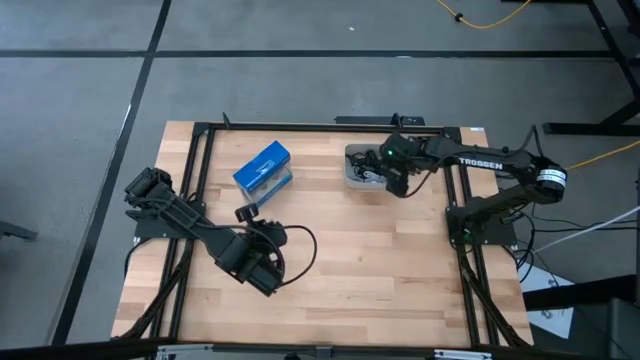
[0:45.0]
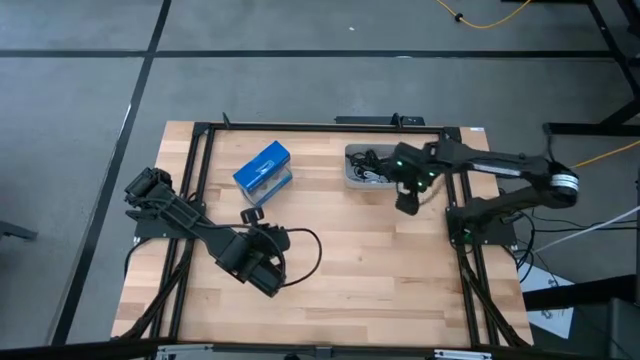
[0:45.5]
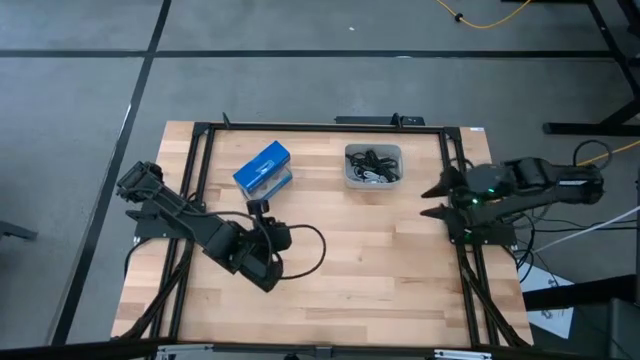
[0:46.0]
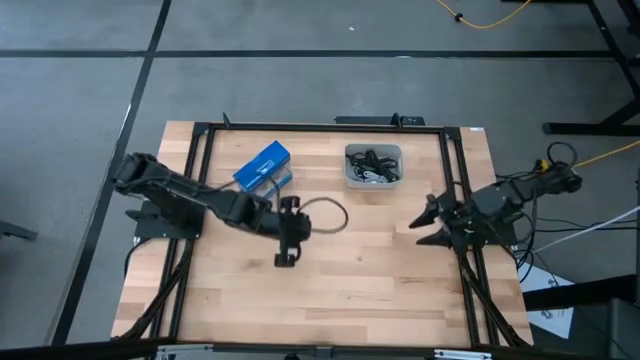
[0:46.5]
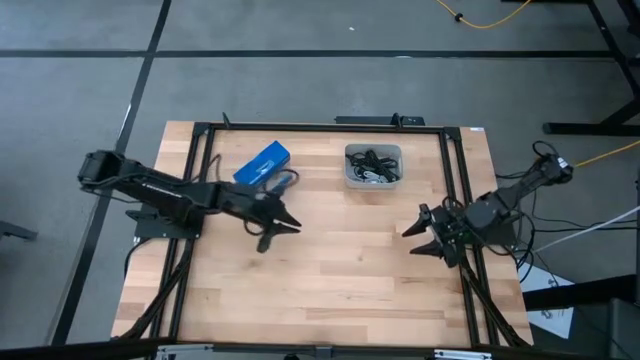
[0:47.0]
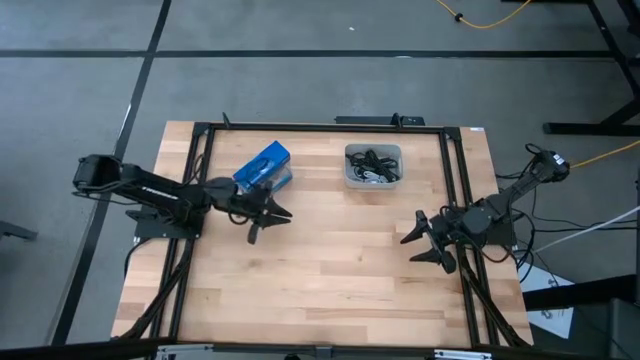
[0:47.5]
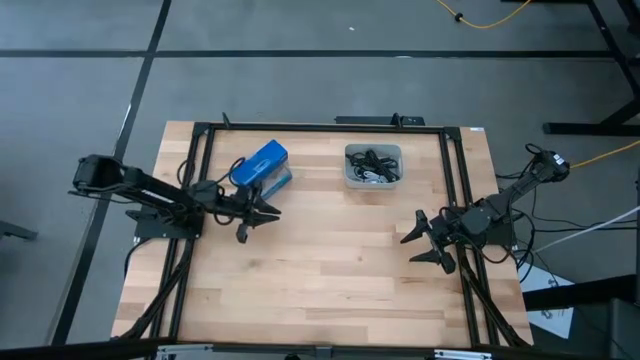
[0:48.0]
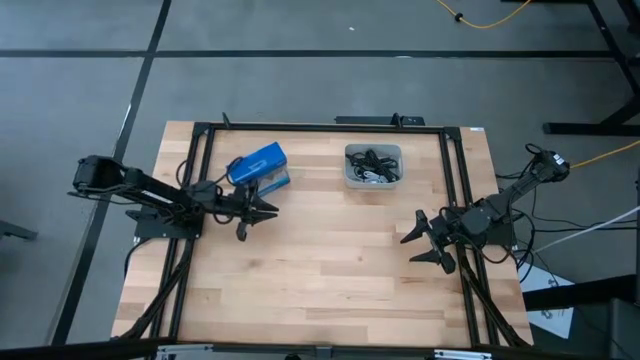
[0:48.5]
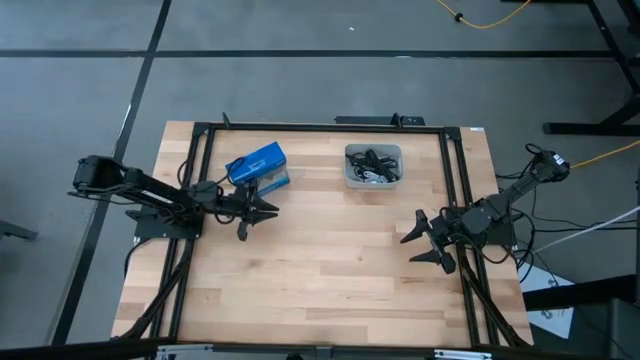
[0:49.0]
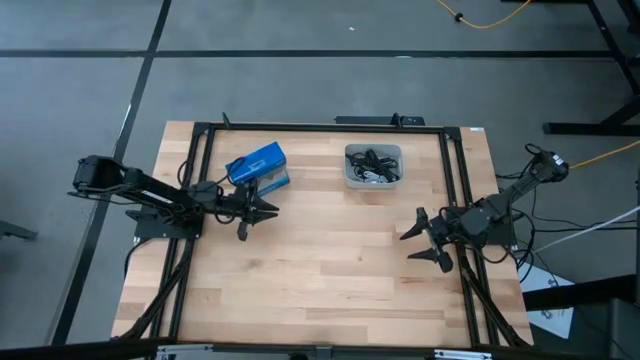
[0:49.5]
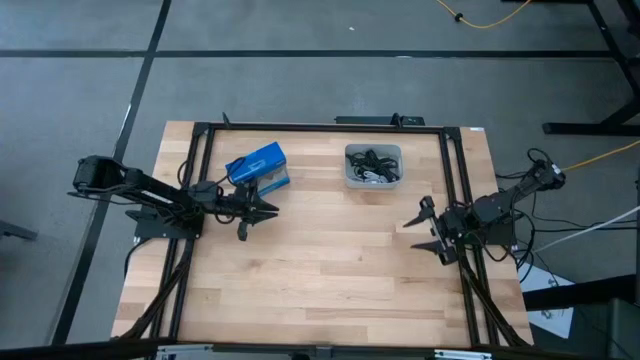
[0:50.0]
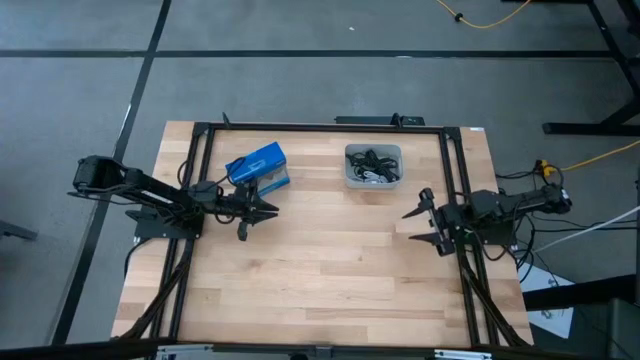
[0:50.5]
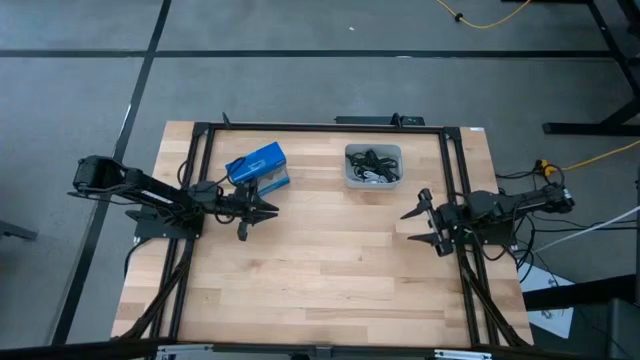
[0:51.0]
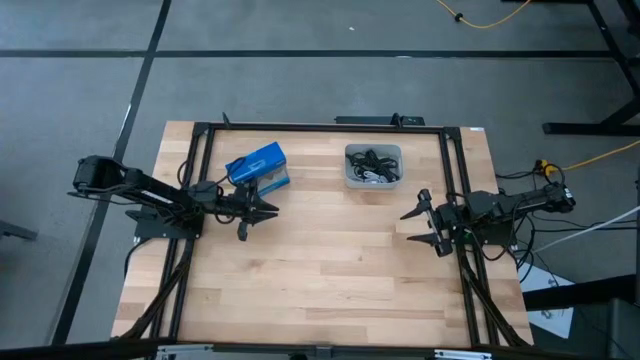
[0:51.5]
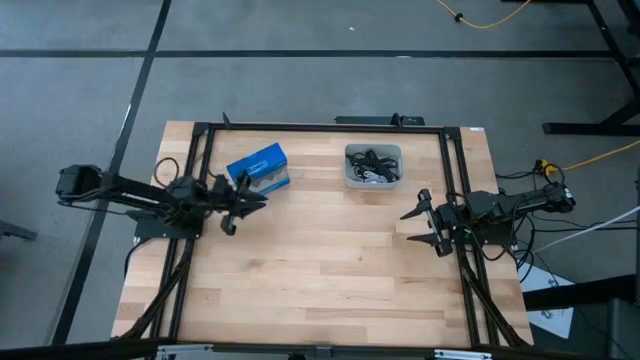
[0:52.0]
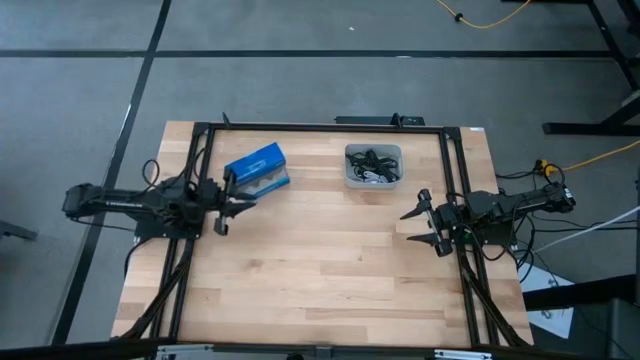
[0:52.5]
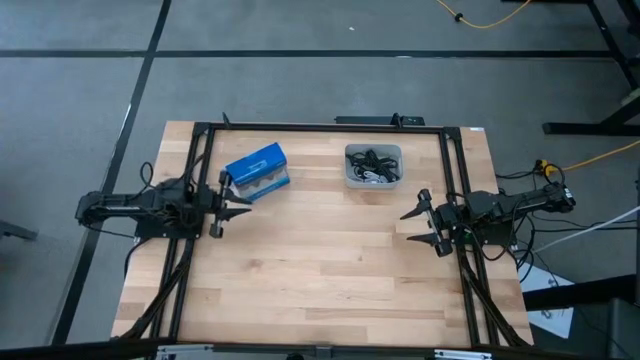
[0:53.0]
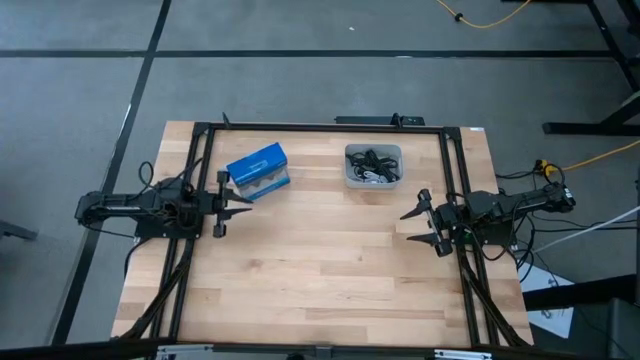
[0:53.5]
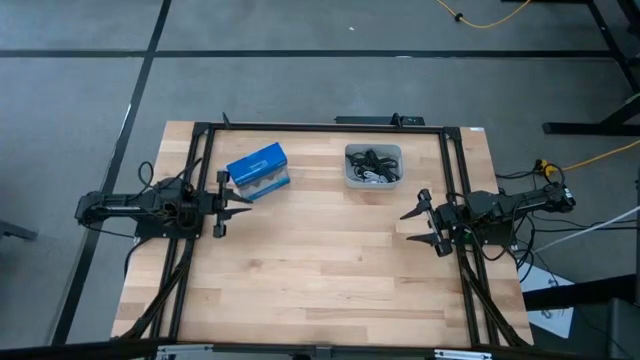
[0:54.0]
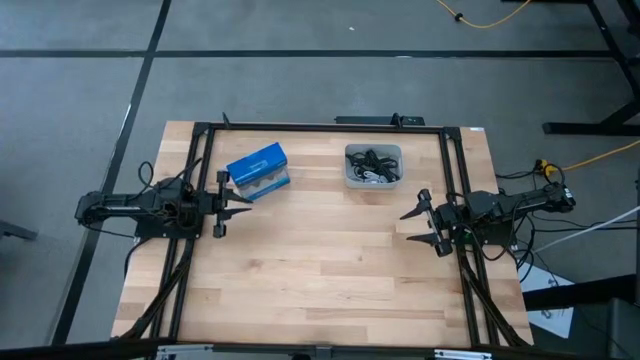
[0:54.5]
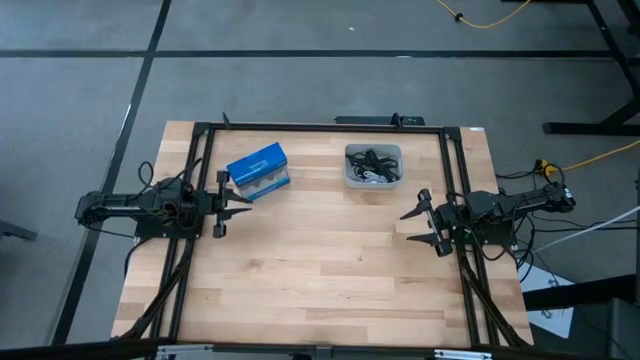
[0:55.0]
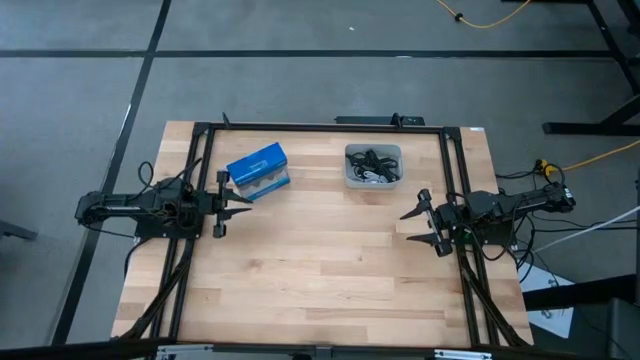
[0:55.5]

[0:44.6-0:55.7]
Task: Pick and place USB-C Cables
Return to Home Position

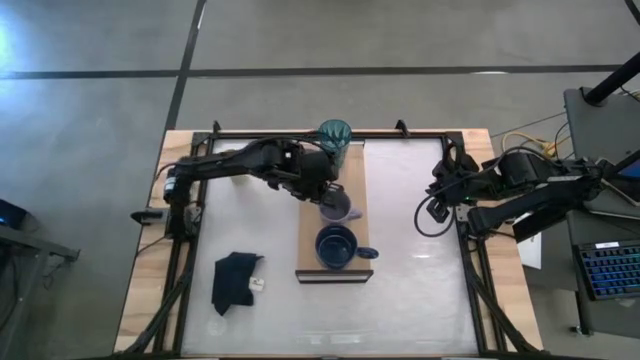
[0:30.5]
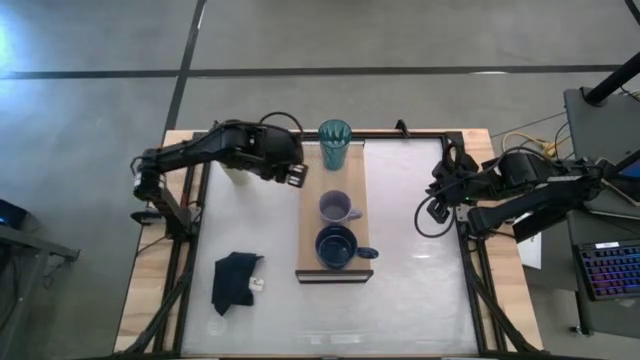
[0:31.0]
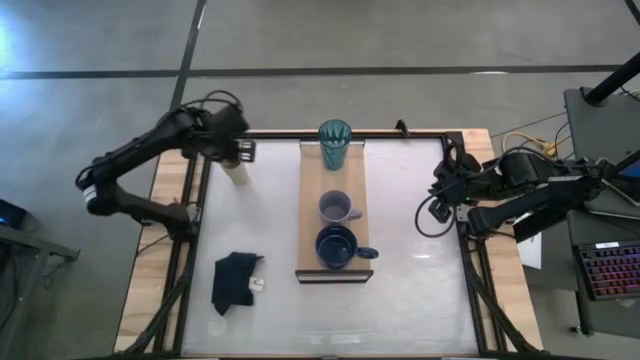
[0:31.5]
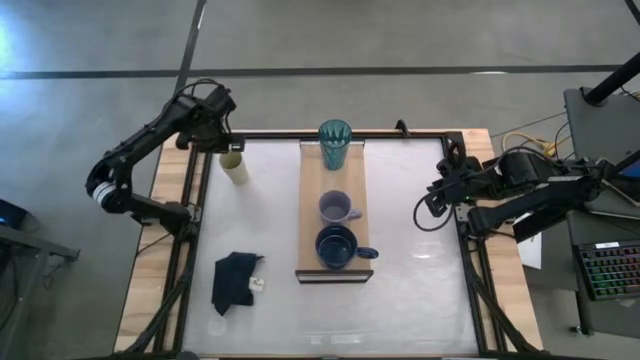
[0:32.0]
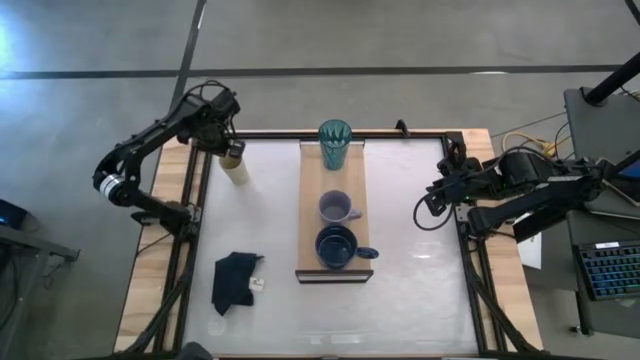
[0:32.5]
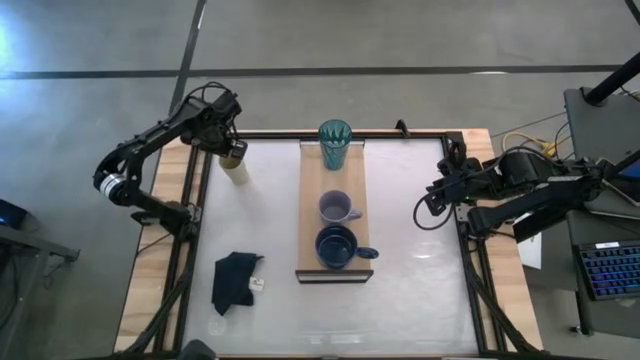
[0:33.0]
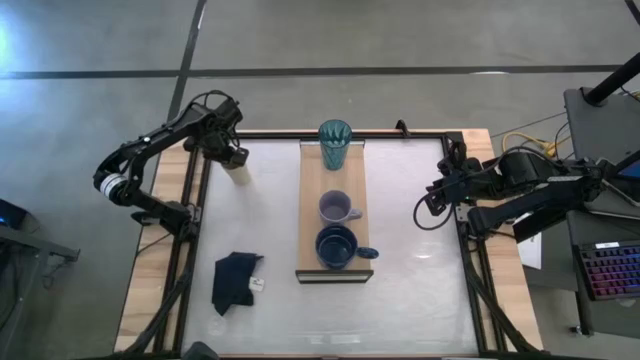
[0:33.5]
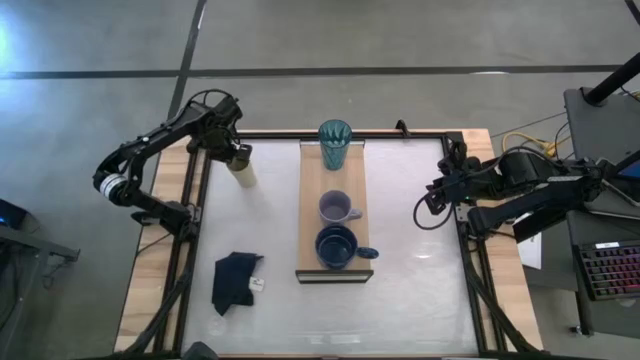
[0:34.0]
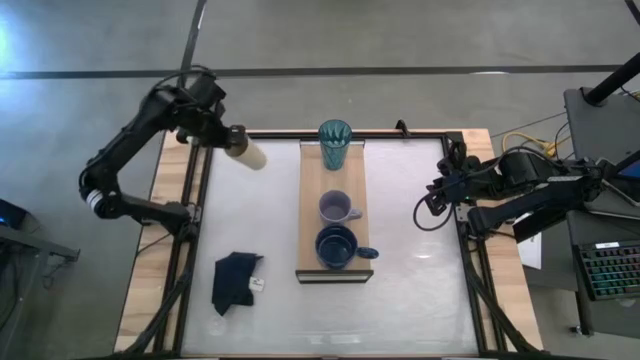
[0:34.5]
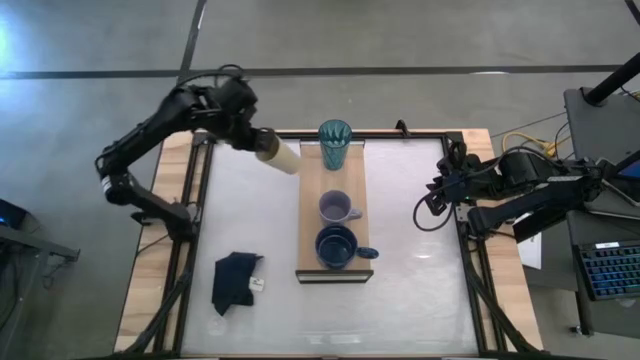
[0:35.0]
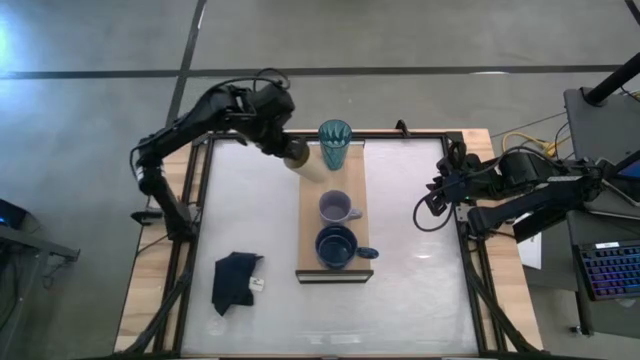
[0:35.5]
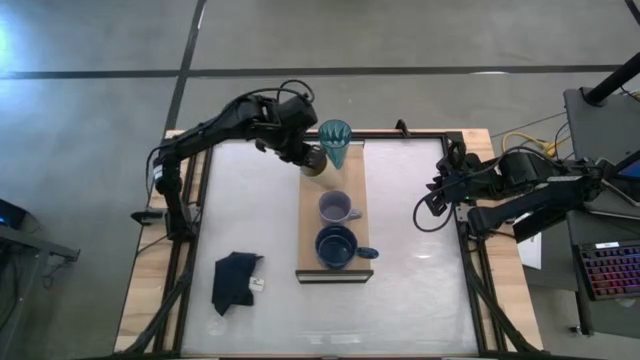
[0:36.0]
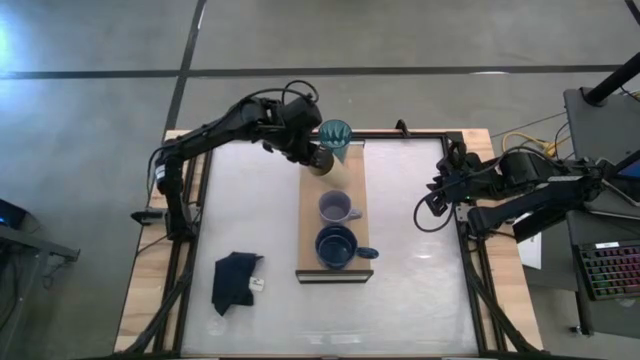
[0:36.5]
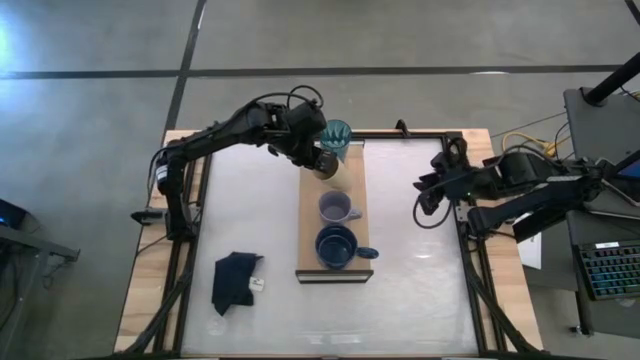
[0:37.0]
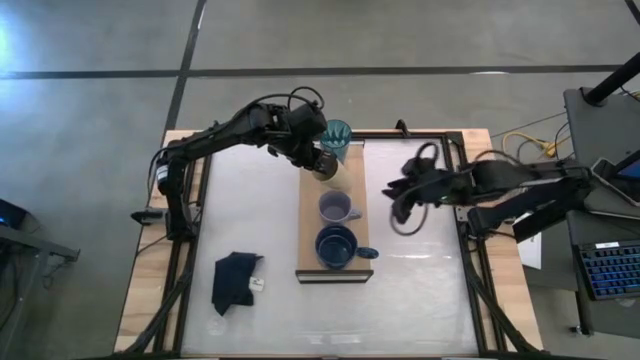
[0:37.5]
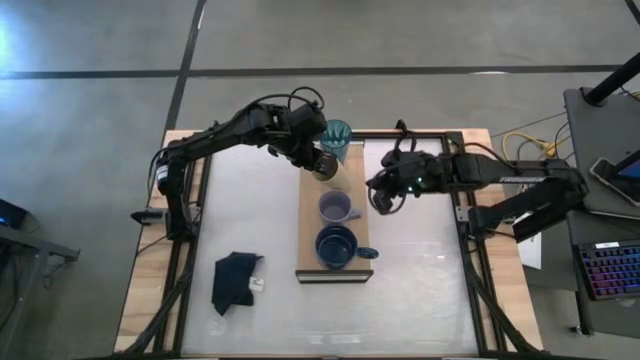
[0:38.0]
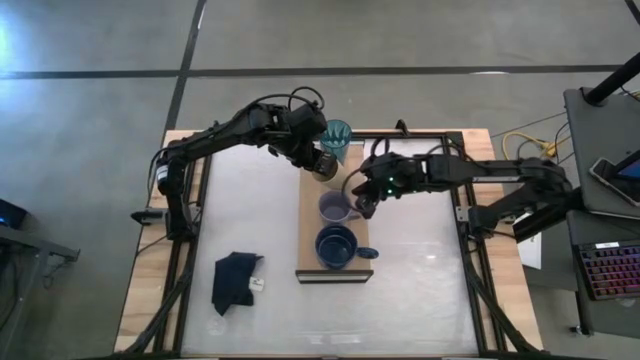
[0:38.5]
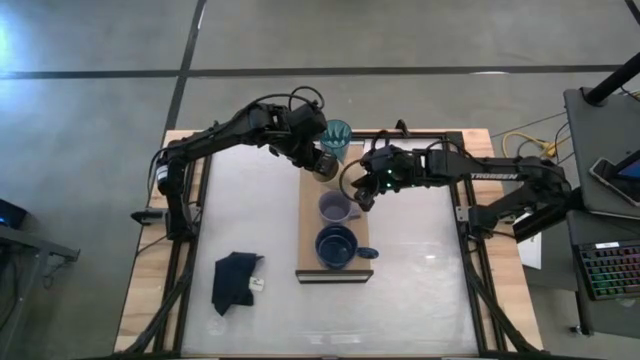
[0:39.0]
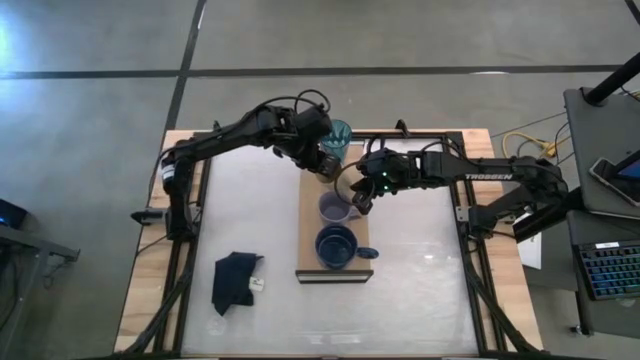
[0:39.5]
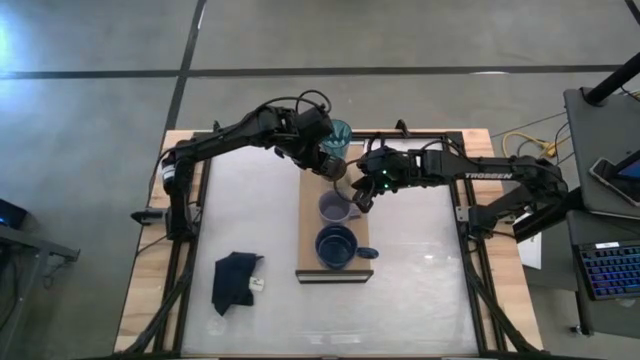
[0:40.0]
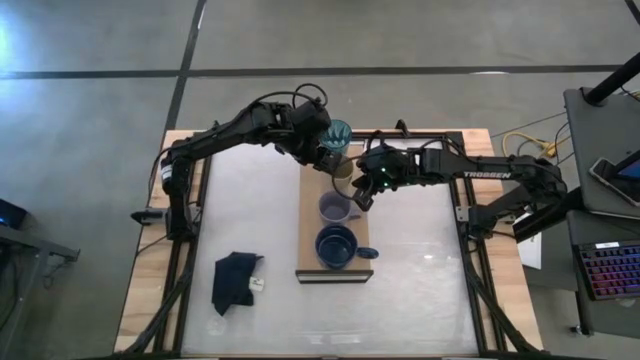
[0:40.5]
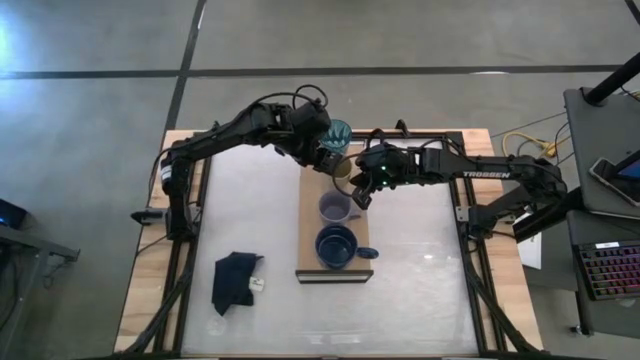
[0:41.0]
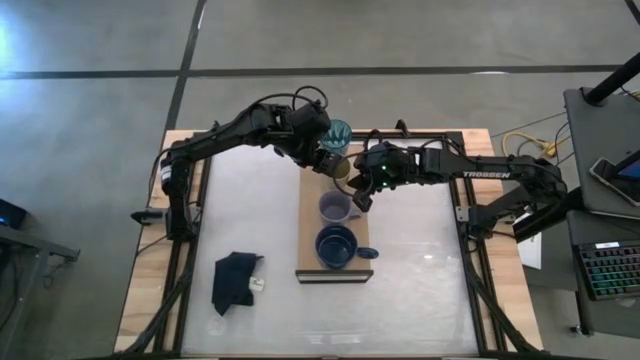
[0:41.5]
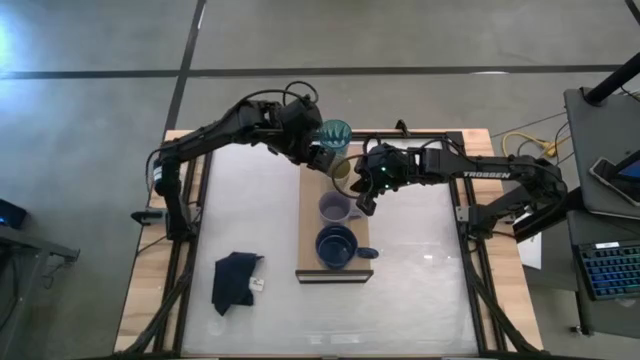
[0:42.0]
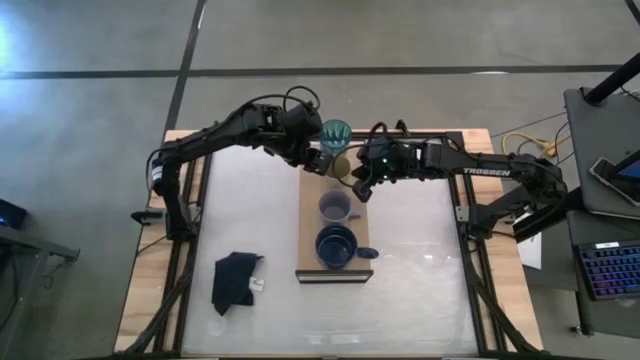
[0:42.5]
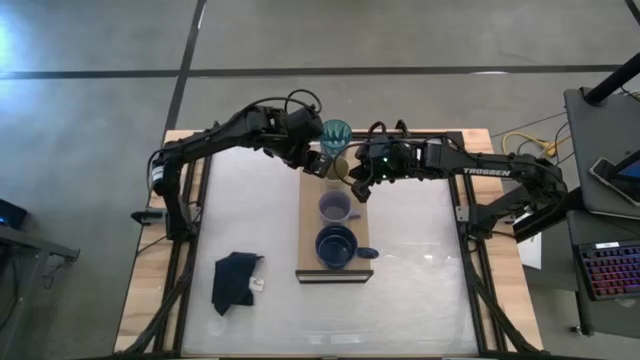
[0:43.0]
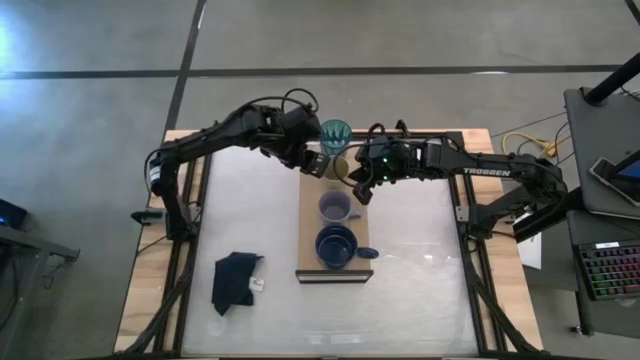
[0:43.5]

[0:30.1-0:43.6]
Task: Stack small to large cups/mugs on shelf
Put the brown cup on the shelf
